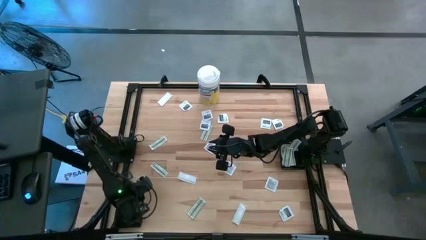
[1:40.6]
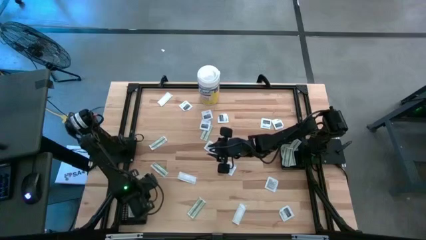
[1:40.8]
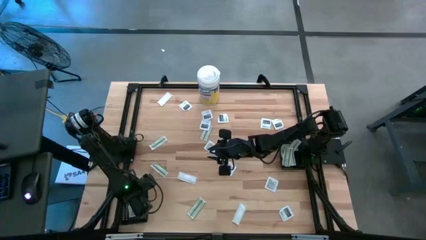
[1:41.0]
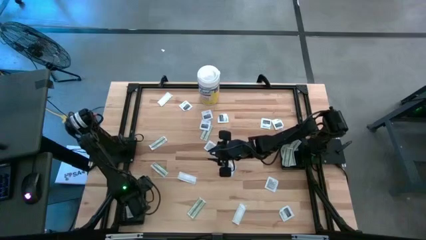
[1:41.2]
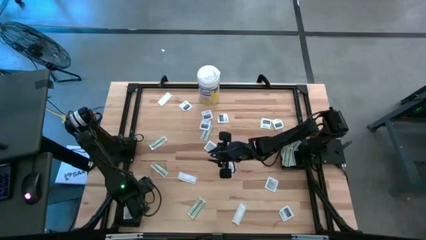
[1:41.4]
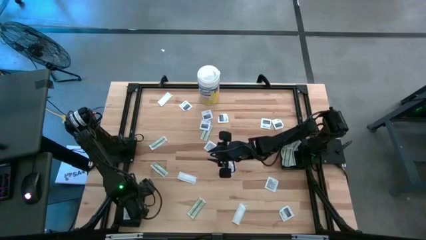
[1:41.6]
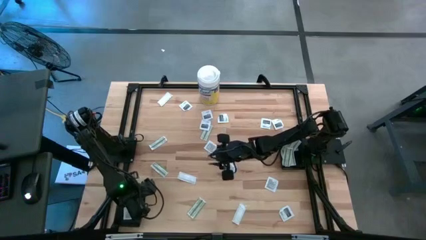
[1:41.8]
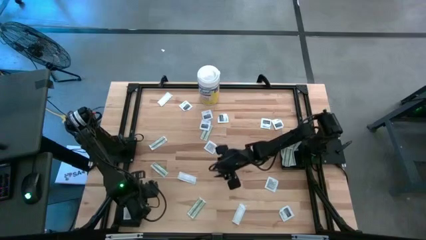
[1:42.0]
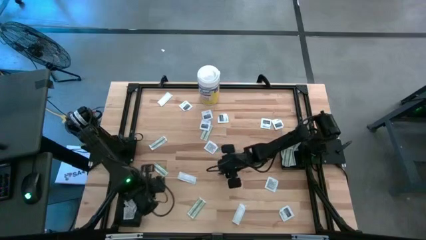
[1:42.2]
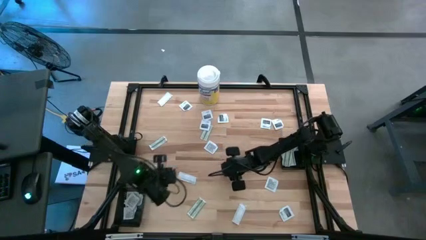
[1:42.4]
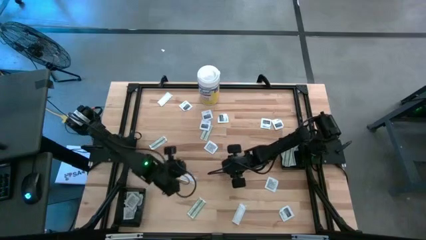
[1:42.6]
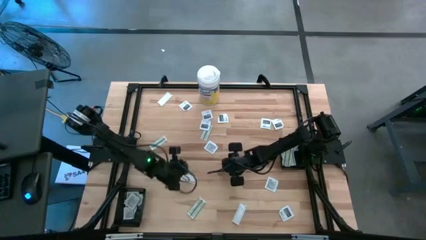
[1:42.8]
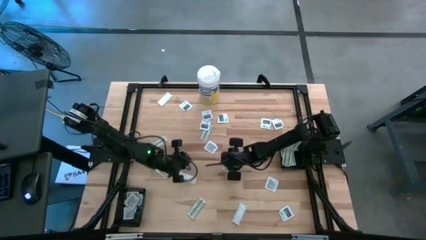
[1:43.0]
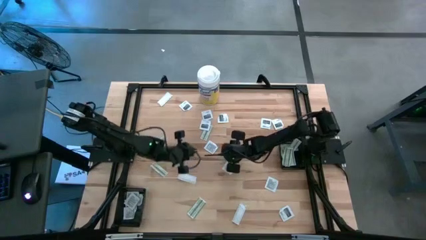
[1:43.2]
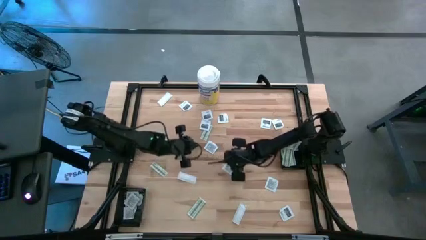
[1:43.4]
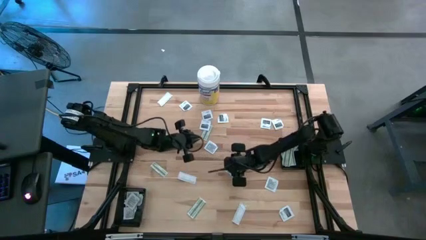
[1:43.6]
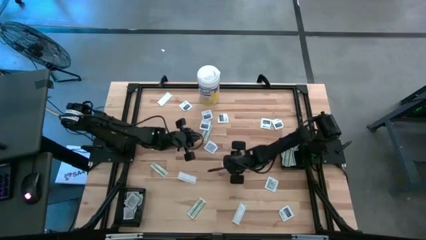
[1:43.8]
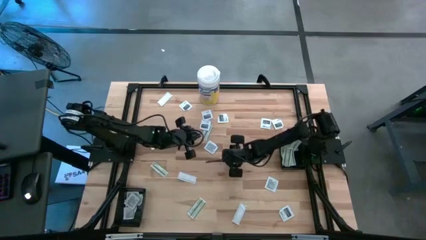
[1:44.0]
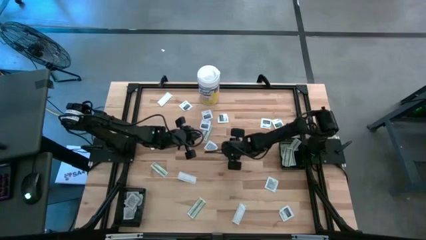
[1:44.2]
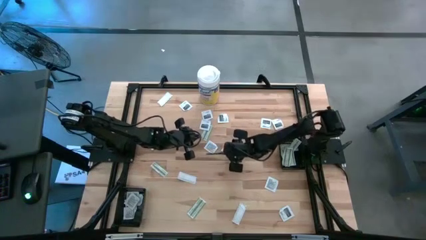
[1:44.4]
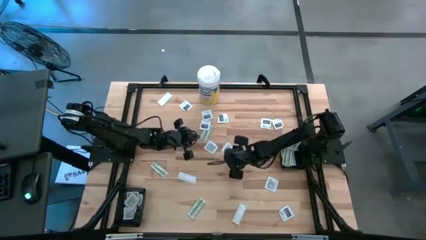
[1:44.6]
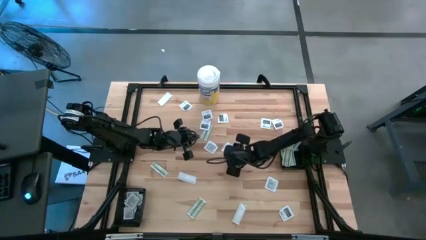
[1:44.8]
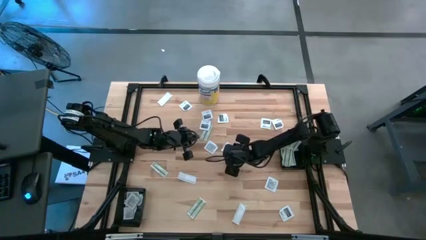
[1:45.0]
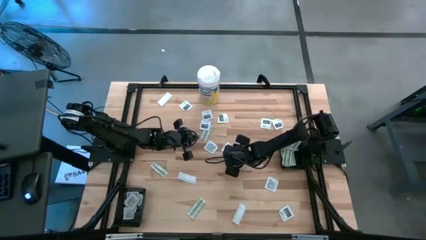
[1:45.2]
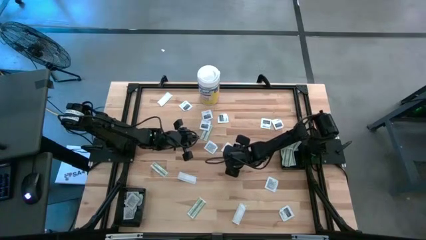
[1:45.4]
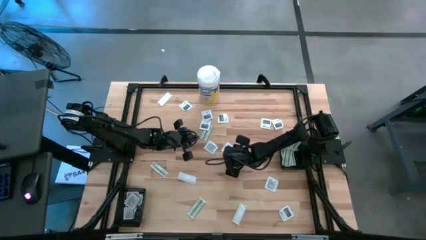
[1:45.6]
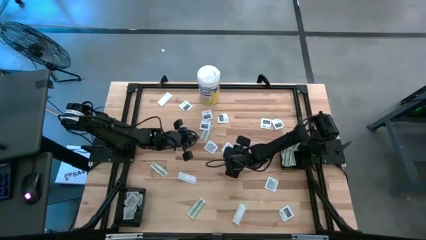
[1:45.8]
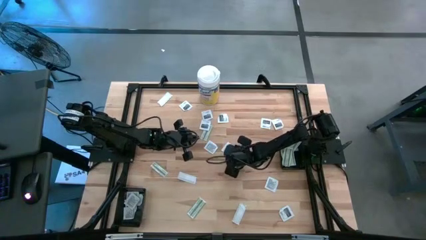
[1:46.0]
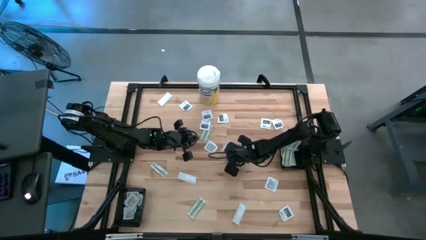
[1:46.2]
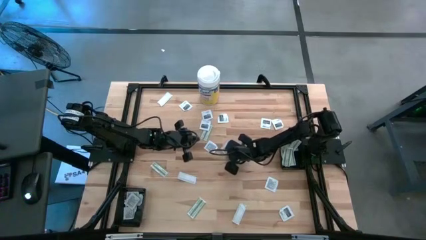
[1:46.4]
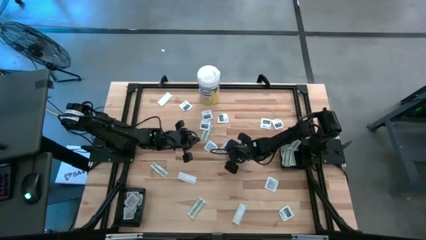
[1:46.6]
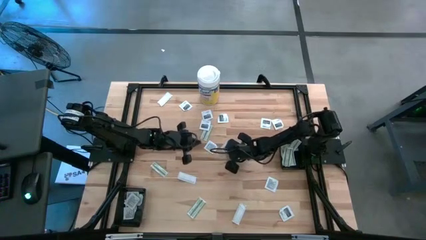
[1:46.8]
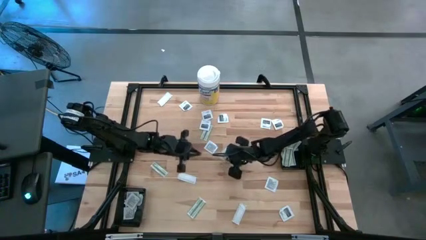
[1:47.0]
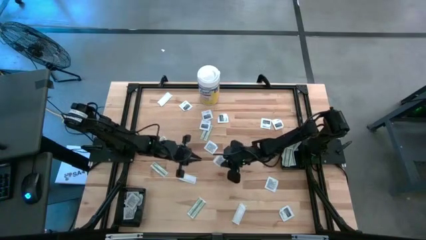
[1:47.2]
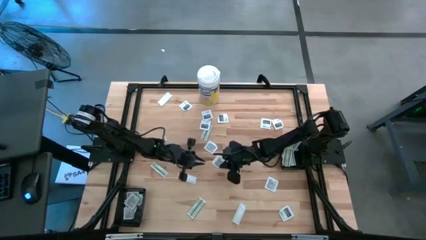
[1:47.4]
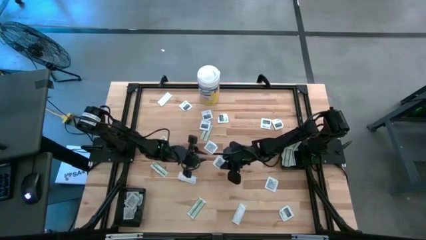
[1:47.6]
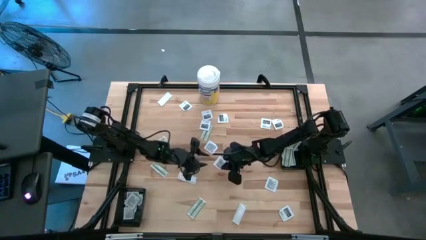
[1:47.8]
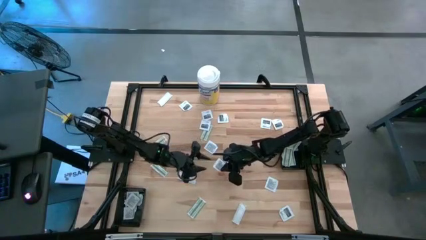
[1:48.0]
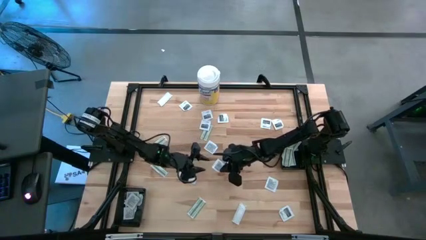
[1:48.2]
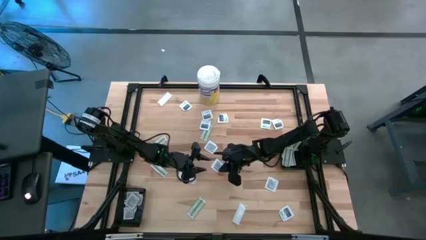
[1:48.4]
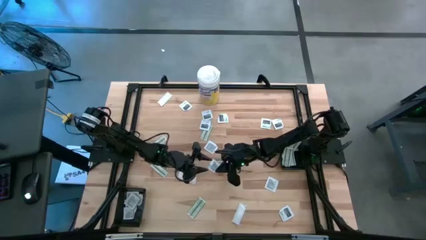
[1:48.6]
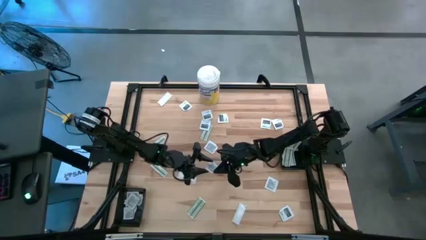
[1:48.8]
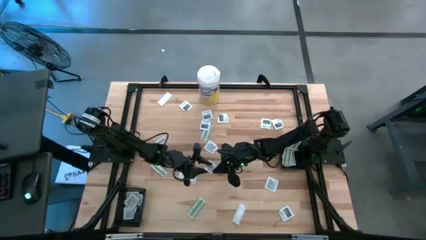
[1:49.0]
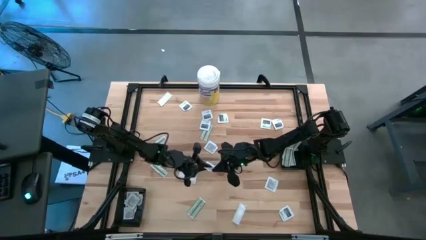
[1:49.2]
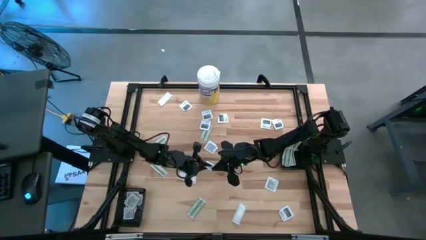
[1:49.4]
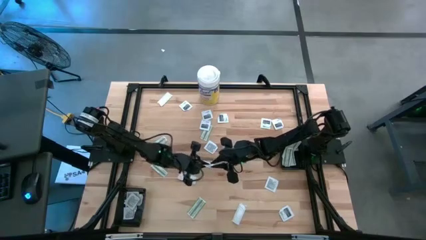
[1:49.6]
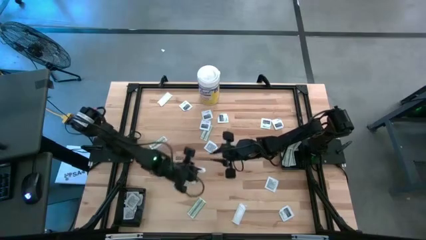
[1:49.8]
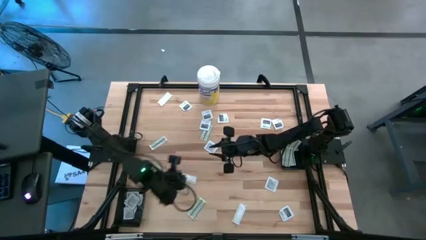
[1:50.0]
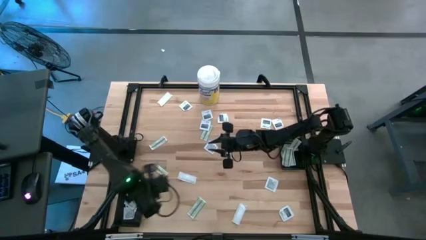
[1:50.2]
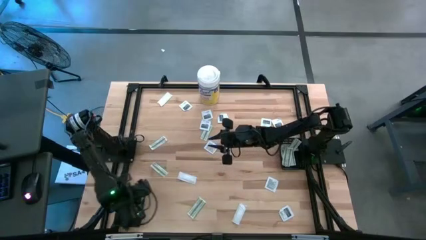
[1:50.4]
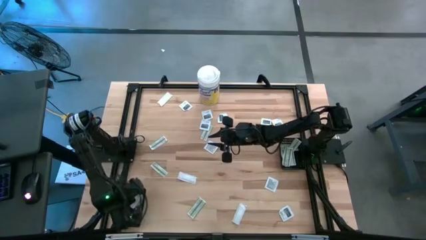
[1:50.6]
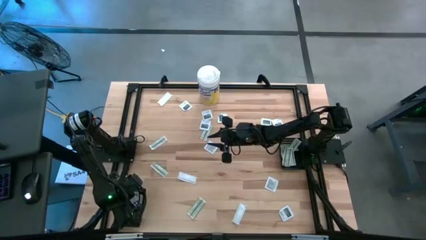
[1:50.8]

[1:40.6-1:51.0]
Task: Pick & Place First Aid Supplies
Put the white towelette sachet into the left black bin
